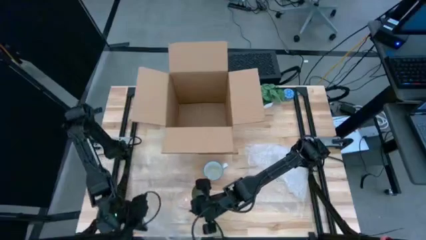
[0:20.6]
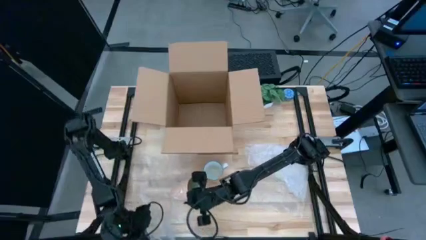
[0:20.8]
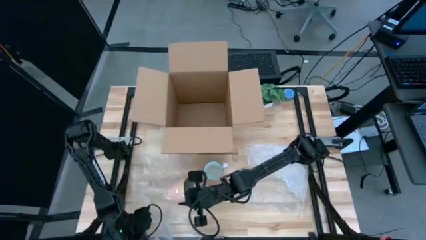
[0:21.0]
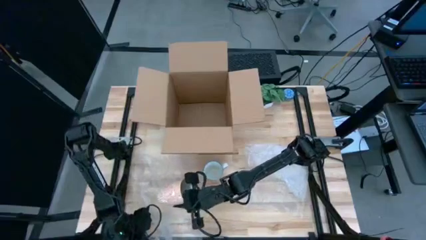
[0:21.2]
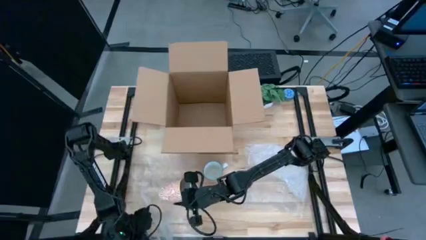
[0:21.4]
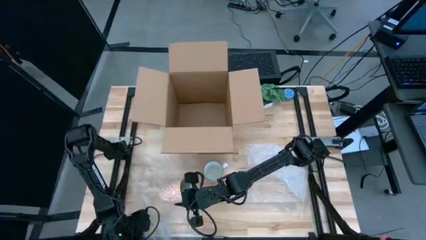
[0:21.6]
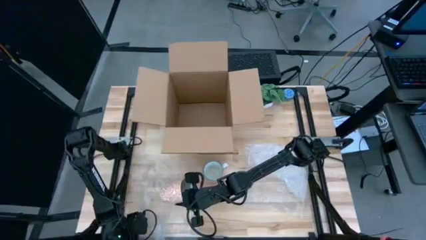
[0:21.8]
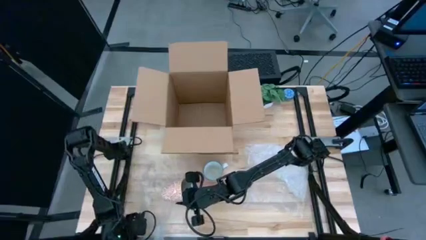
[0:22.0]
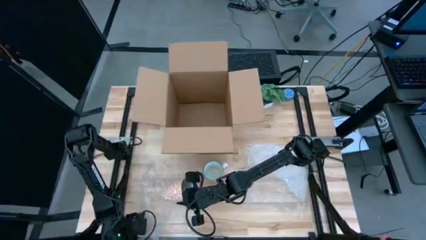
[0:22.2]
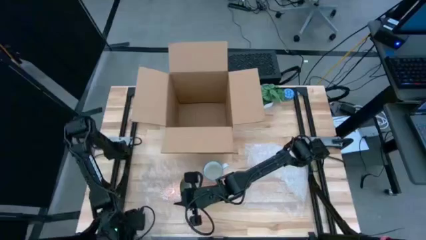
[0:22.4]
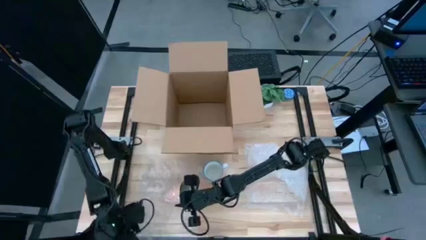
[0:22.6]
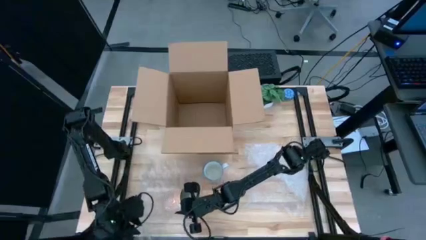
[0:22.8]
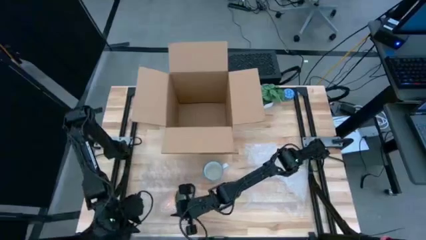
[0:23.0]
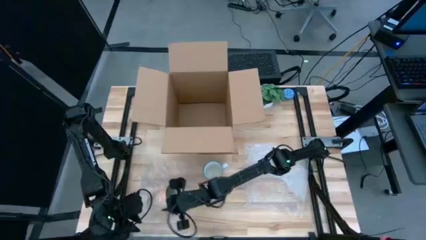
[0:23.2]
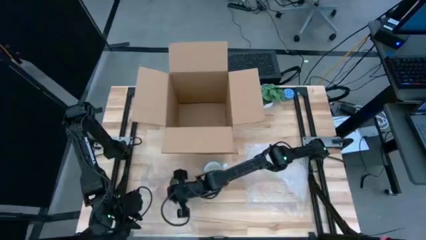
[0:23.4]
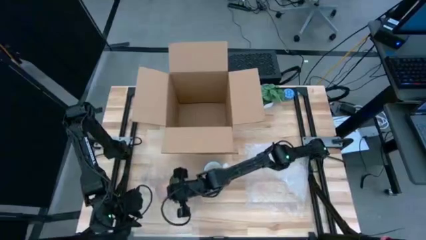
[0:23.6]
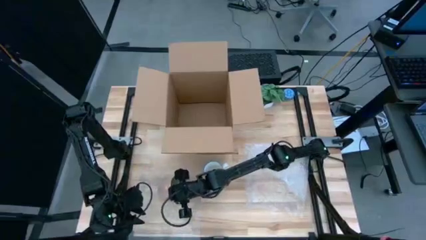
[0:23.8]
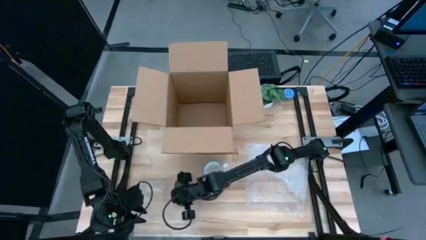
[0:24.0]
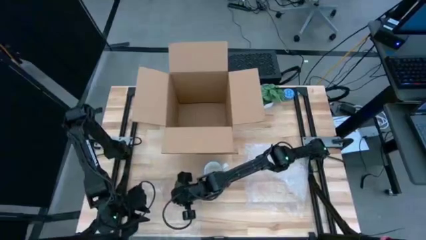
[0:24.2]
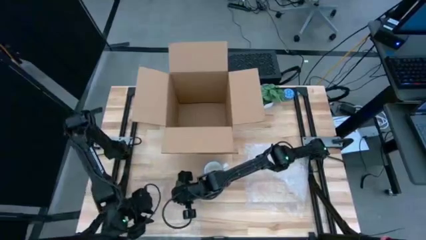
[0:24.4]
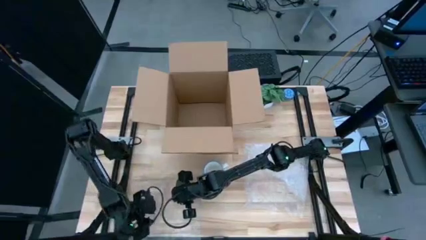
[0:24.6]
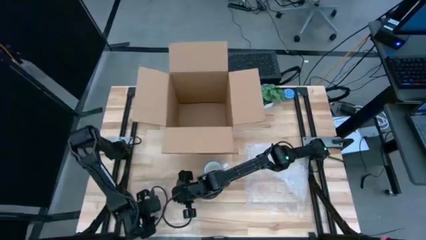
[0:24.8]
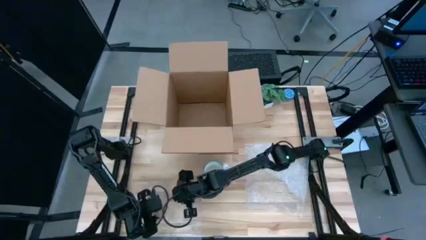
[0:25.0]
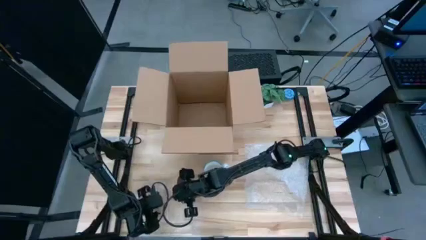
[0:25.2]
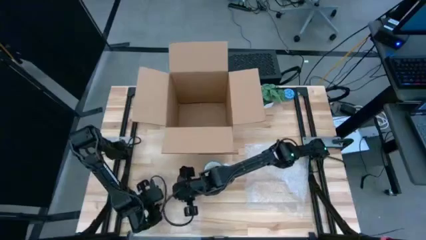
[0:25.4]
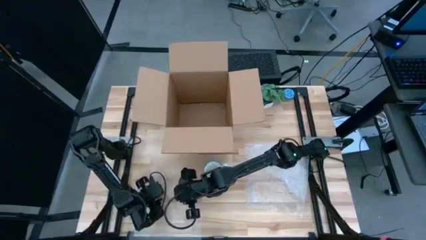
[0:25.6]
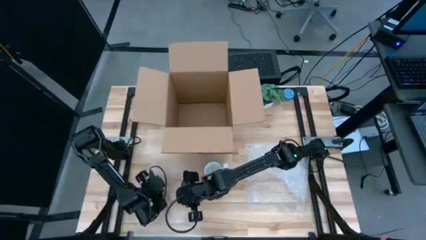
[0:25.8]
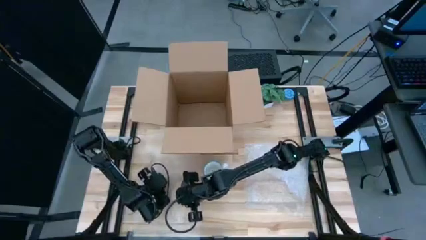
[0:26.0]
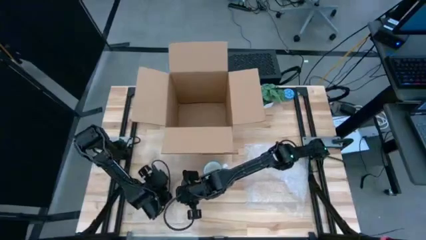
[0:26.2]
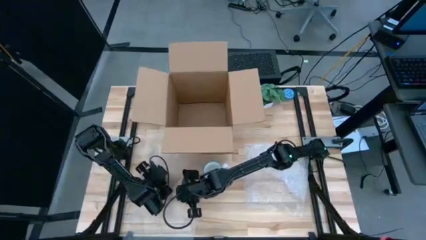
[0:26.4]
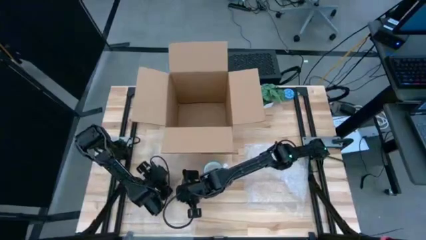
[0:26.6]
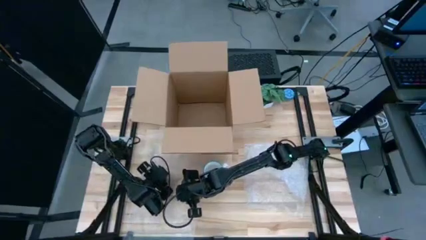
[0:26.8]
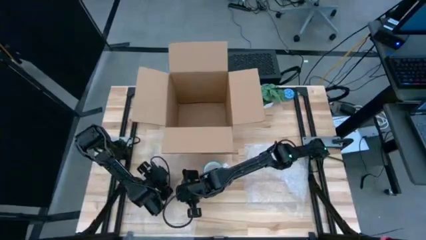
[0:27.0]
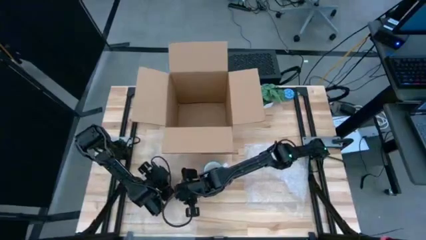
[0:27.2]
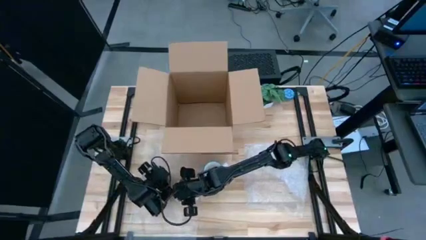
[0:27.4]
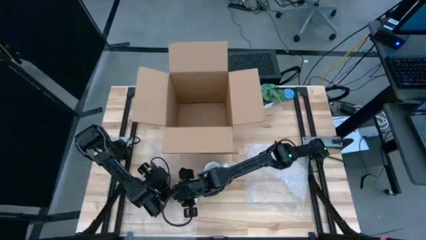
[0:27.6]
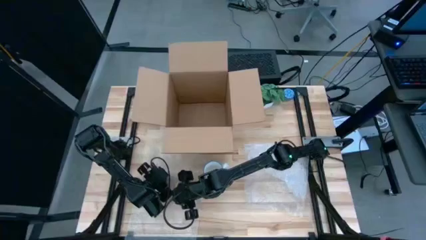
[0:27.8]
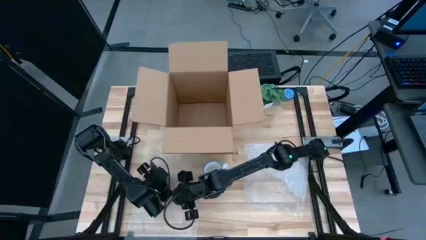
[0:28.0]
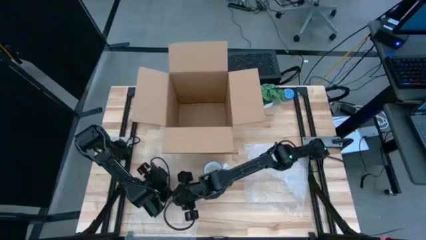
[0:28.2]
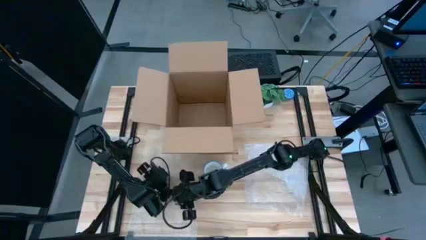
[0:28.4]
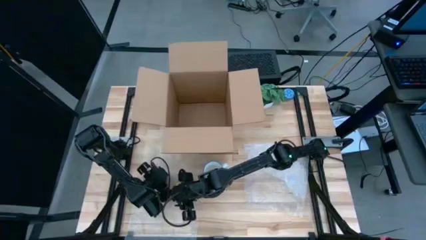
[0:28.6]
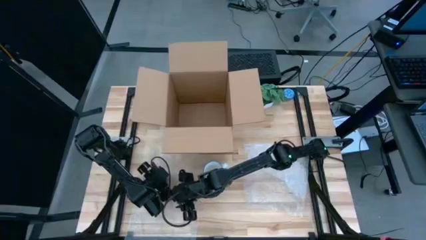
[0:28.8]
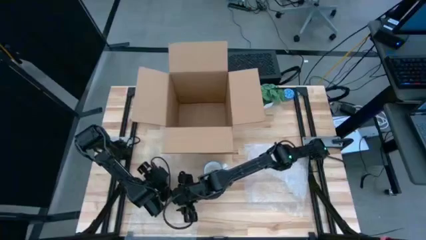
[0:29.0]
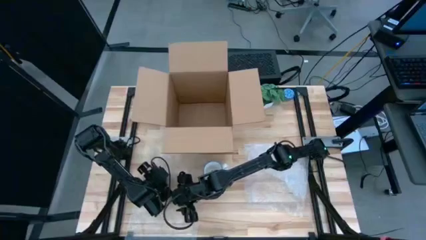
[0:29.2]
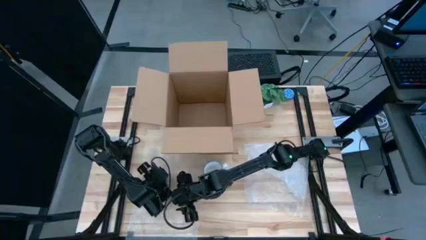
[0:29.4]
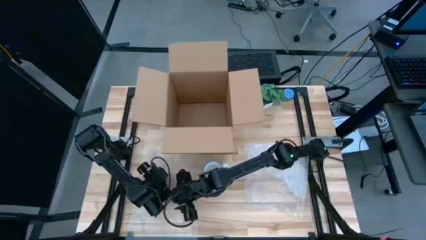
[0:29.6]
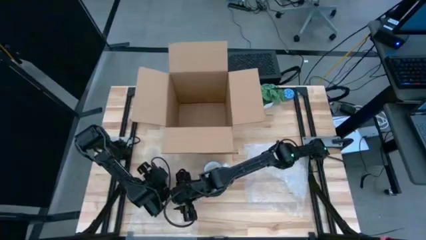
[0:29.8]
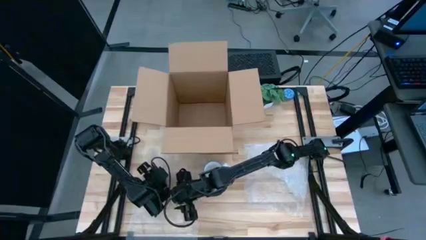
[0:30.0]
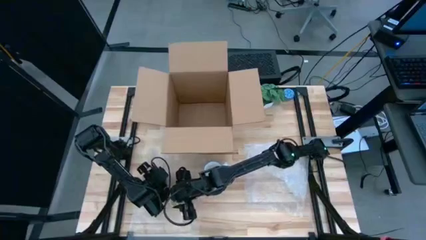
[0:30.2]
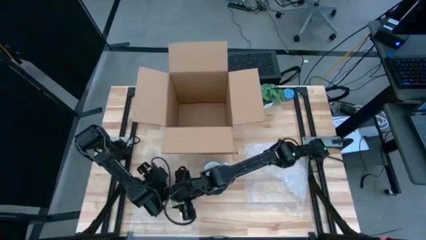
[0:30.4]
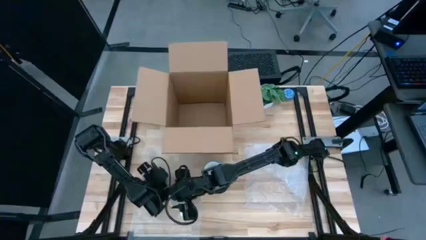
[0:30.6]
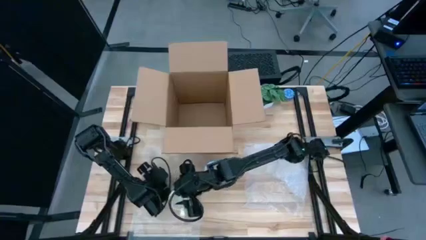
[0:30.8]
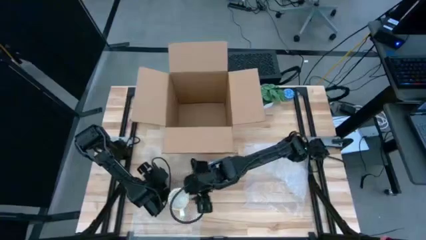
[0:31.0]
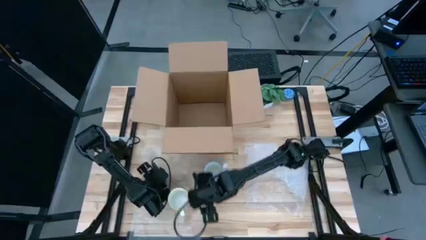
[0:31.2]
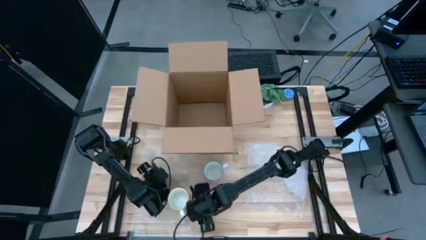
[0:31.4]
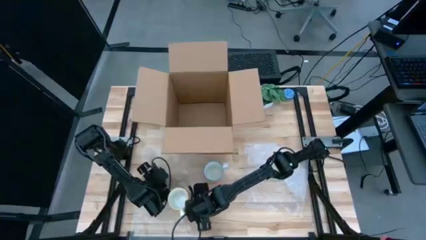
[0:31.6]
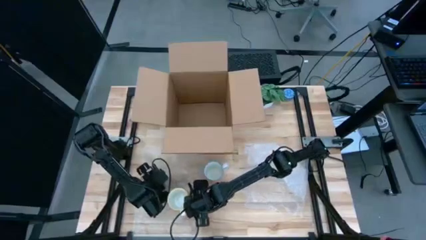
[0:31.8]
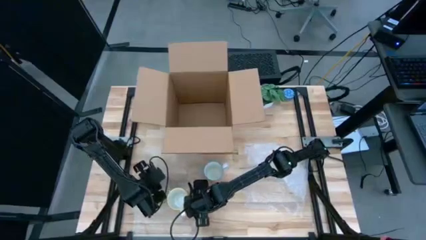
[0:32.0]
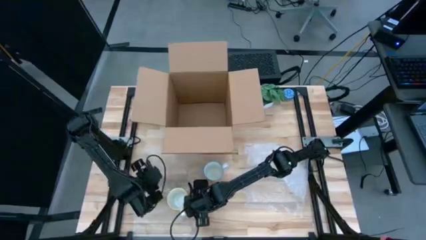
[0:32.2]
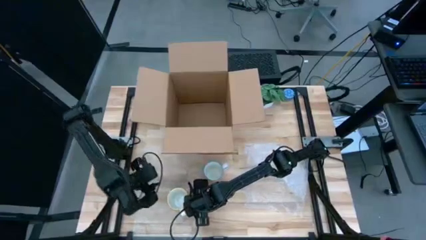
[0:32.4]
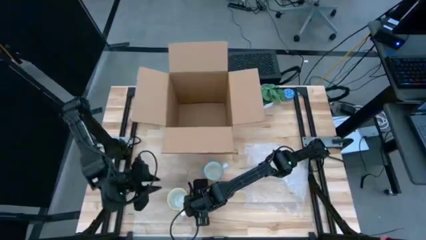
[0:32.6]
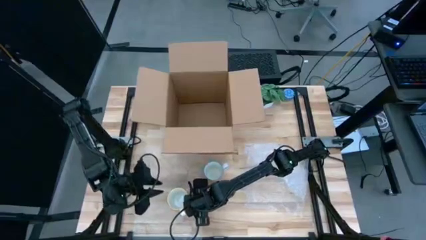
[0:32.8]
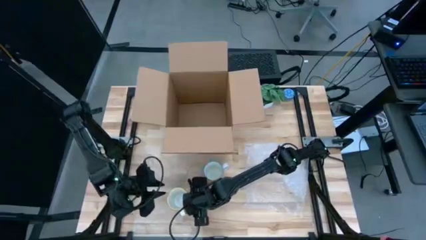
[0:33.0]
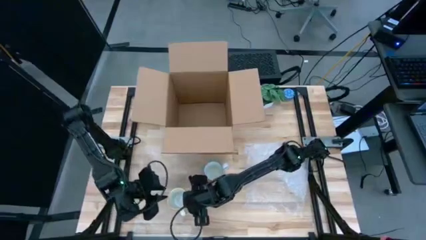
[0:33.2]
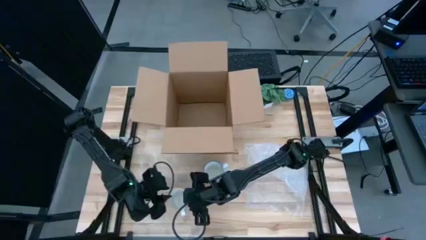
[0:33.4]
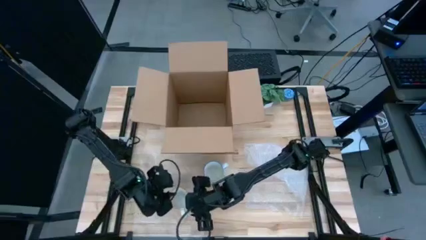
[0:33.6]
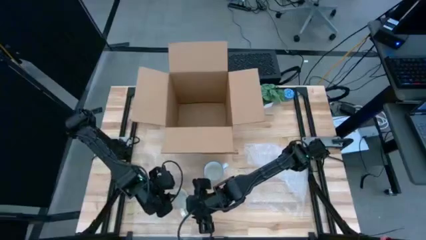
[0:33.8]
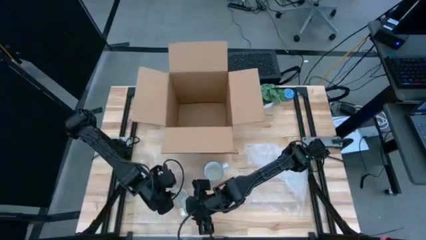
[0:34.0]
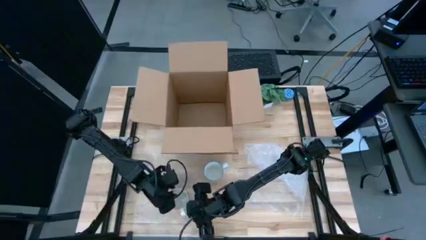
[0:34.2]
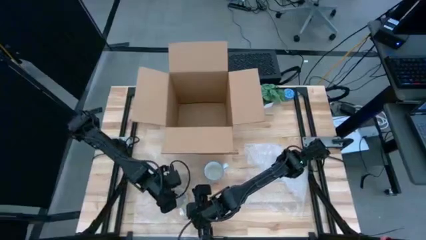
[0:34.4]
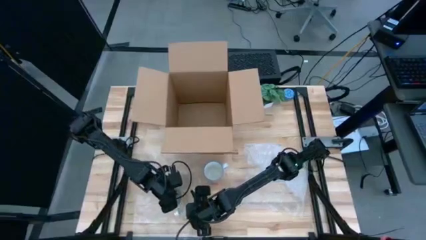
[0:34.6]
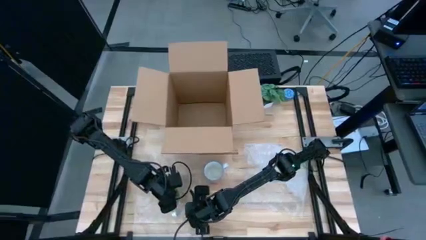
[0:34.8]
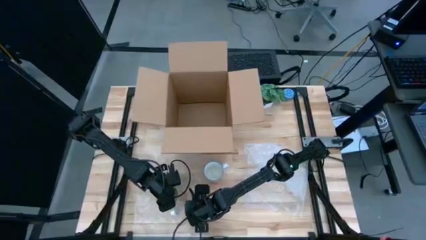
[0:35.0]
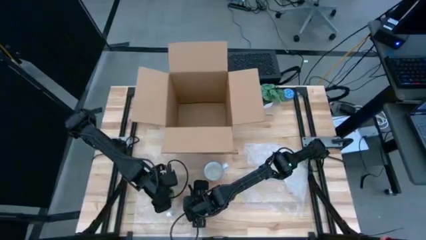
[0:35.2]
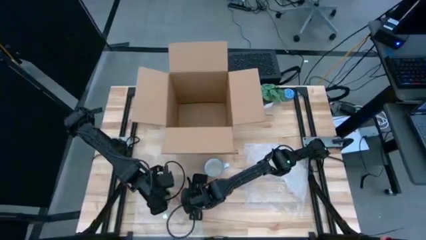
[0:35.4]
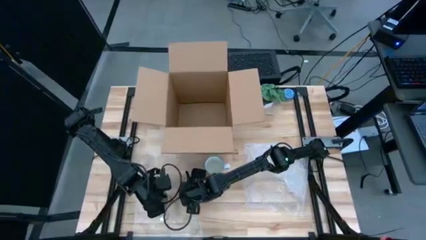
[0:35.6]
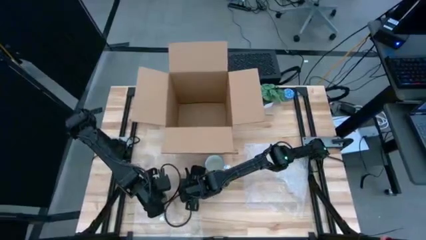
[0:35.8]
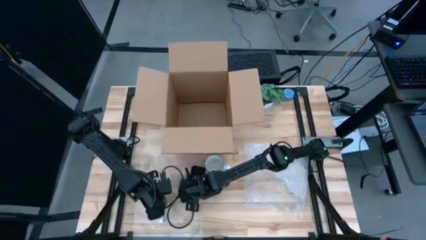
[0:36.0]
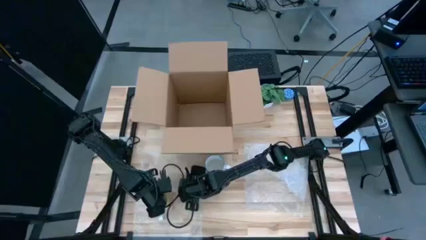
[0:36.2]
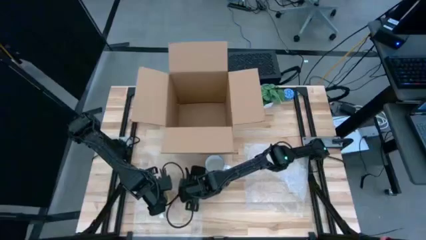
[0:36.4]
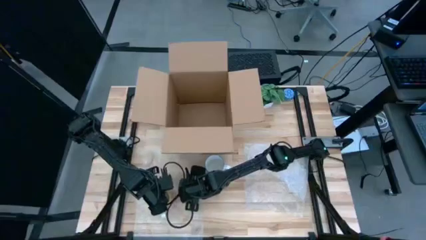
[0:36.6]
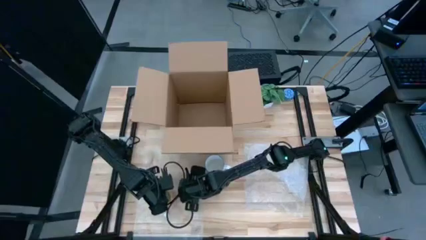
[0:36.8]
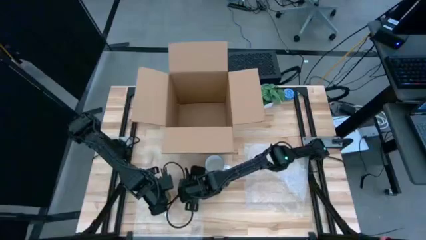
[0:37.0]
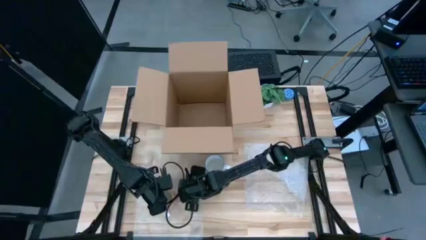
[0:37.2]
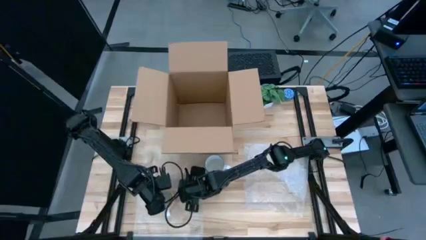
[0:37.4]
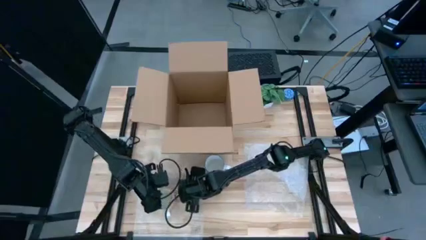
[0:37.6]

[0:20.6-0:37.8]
Task: wrap mug
Wrap the yellow mug with bubble wrap
